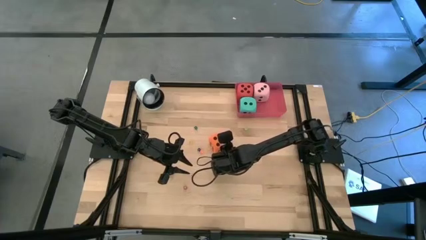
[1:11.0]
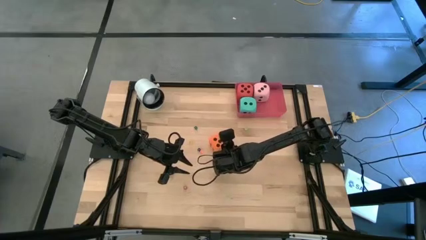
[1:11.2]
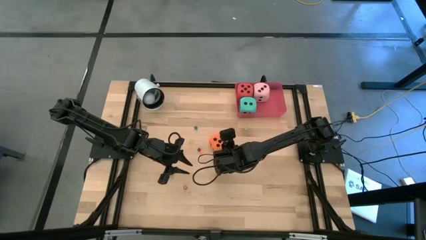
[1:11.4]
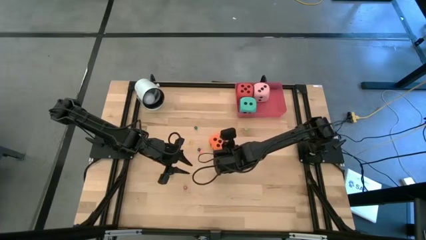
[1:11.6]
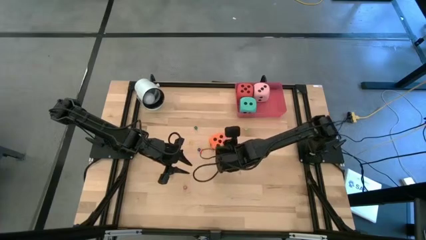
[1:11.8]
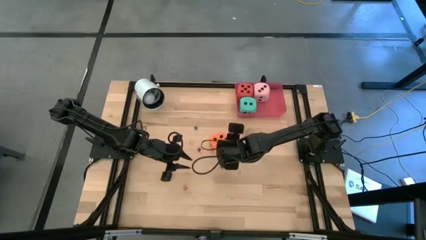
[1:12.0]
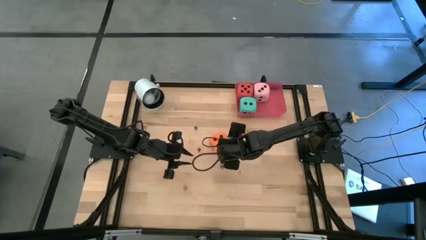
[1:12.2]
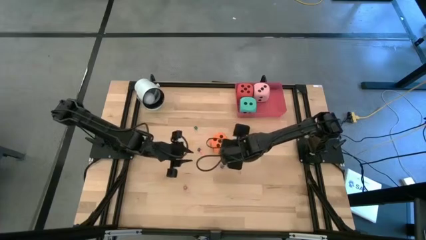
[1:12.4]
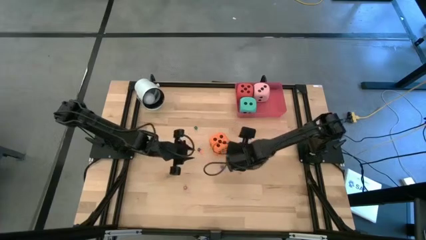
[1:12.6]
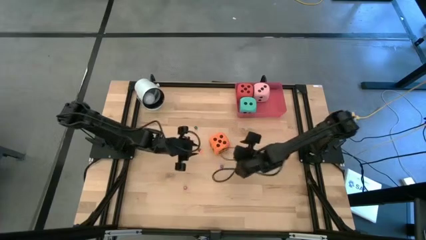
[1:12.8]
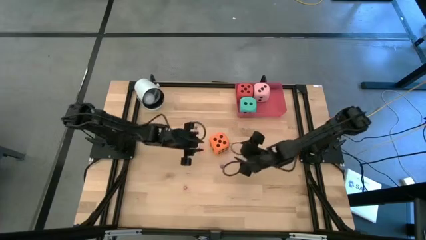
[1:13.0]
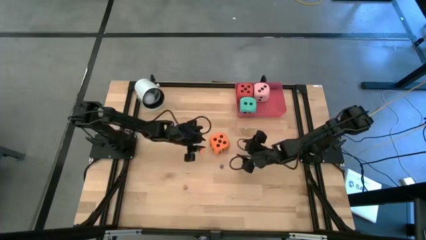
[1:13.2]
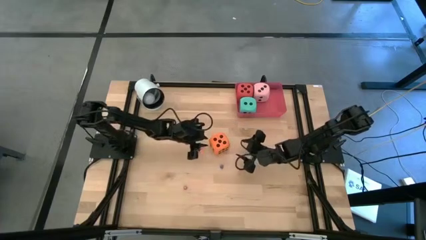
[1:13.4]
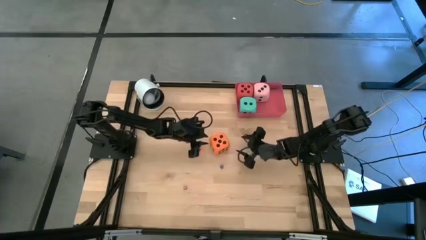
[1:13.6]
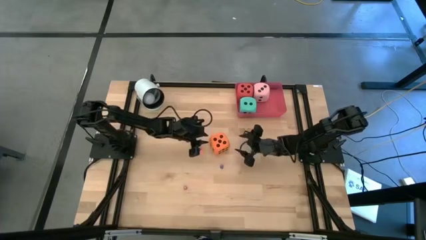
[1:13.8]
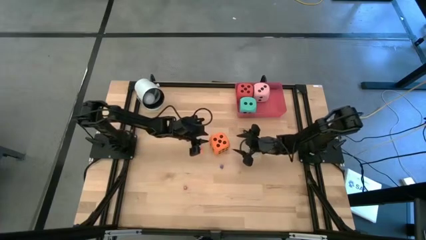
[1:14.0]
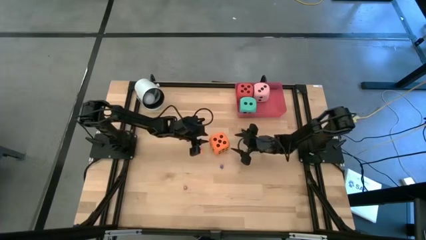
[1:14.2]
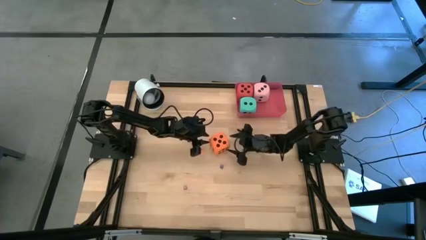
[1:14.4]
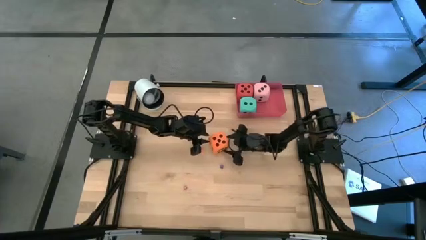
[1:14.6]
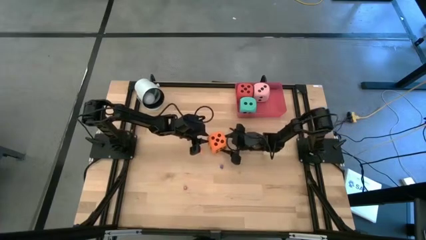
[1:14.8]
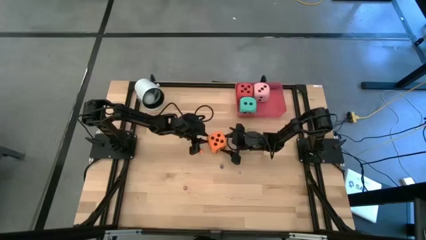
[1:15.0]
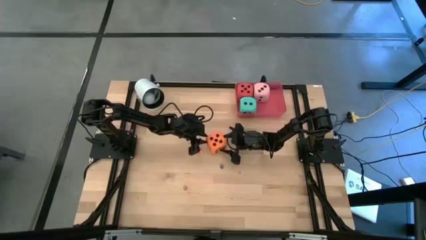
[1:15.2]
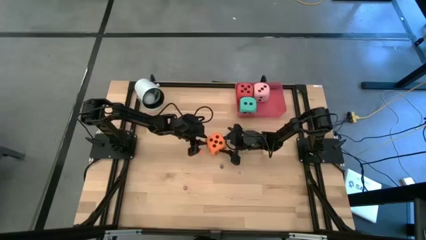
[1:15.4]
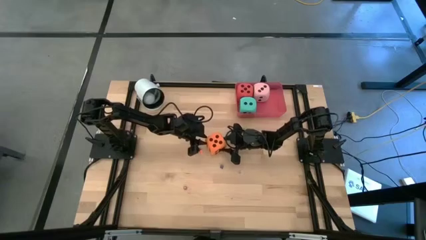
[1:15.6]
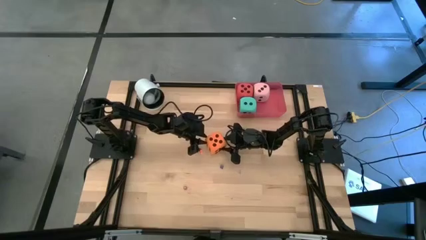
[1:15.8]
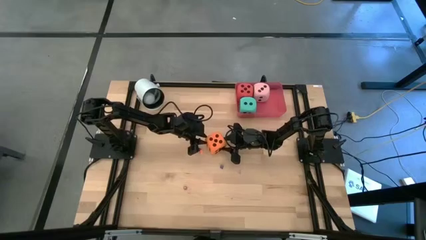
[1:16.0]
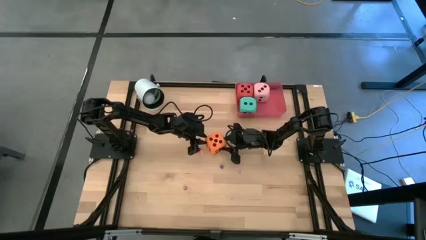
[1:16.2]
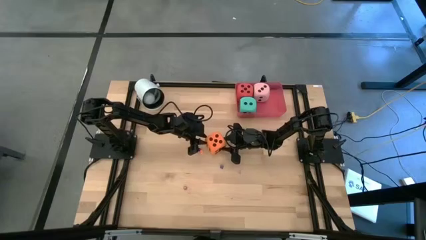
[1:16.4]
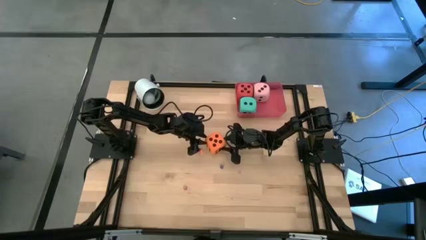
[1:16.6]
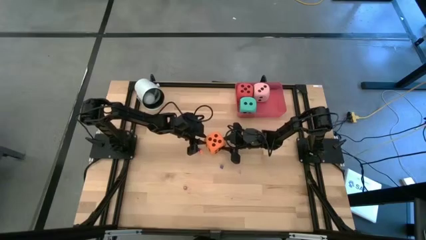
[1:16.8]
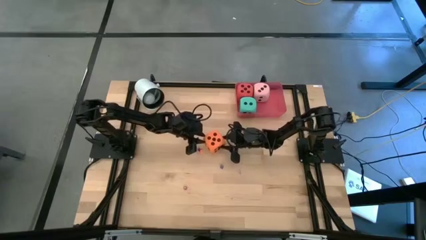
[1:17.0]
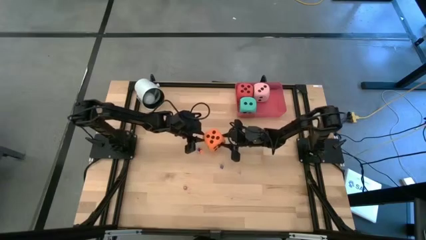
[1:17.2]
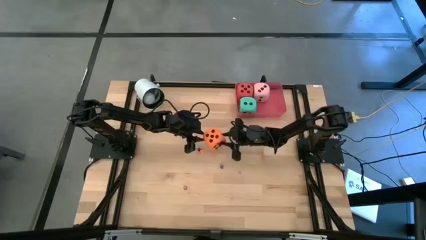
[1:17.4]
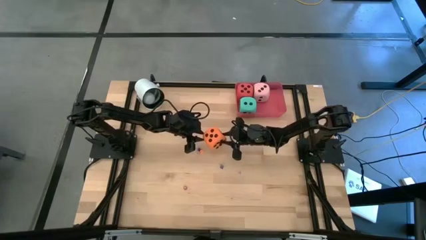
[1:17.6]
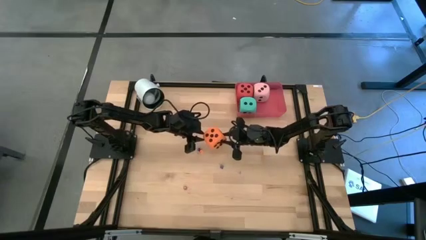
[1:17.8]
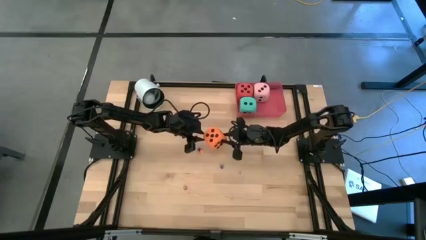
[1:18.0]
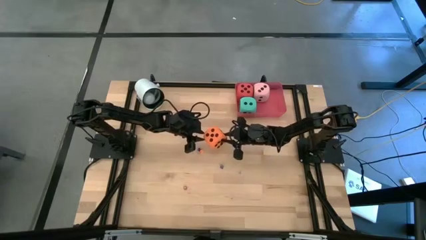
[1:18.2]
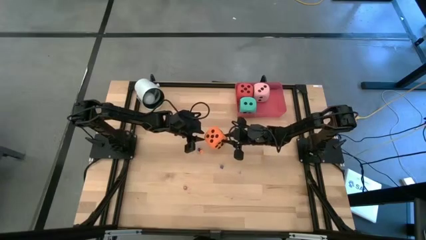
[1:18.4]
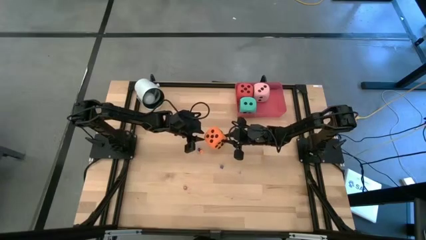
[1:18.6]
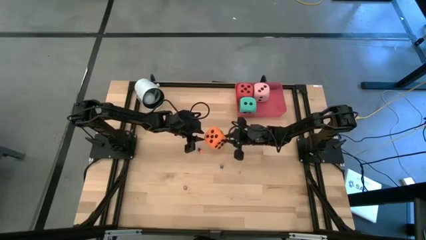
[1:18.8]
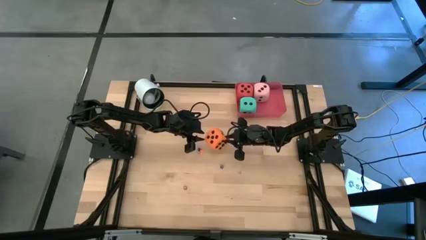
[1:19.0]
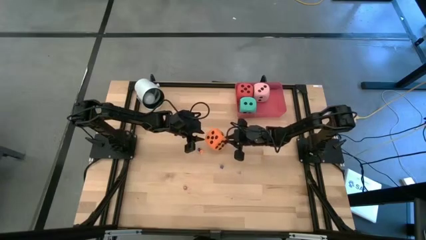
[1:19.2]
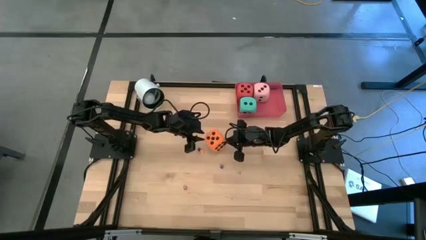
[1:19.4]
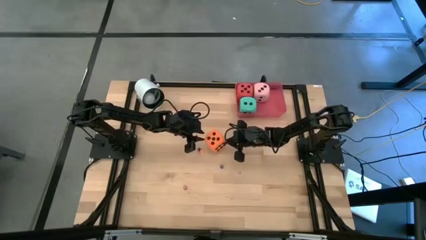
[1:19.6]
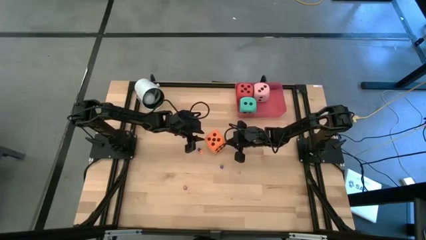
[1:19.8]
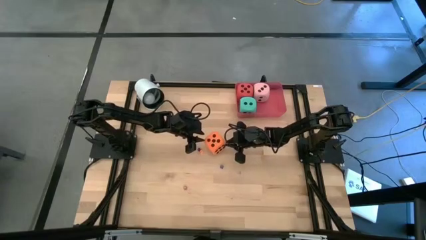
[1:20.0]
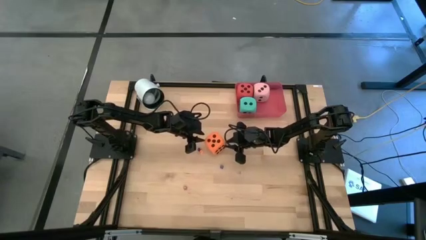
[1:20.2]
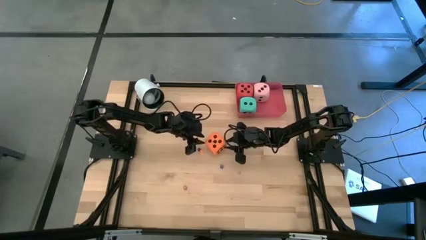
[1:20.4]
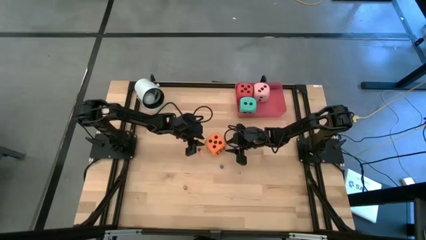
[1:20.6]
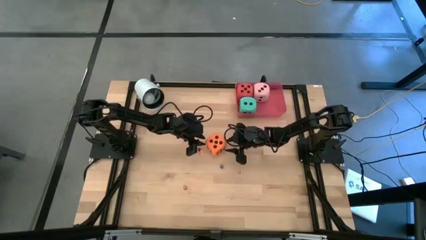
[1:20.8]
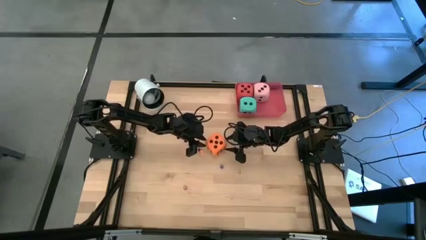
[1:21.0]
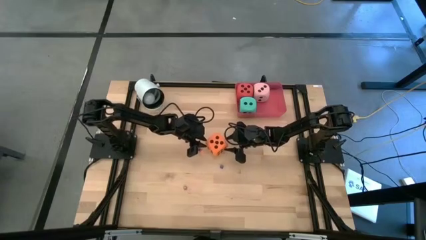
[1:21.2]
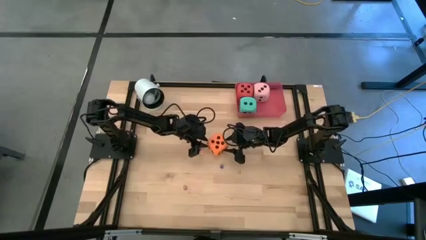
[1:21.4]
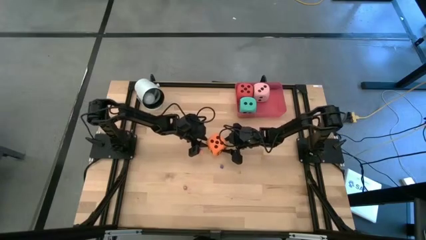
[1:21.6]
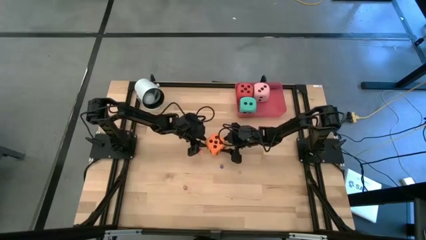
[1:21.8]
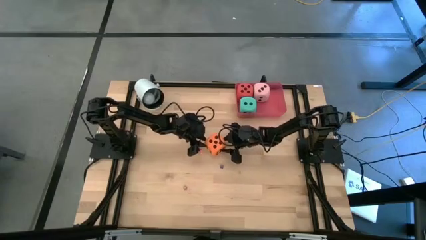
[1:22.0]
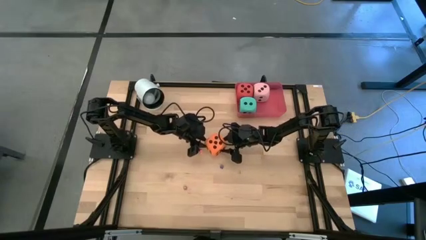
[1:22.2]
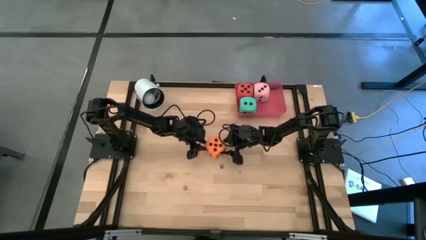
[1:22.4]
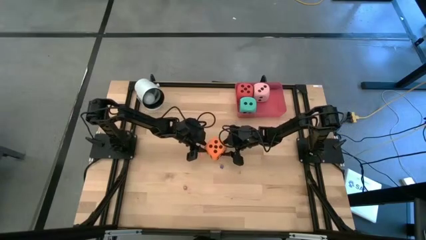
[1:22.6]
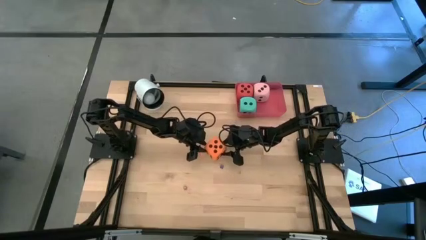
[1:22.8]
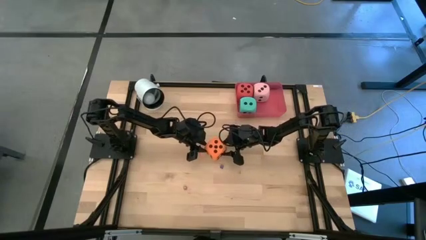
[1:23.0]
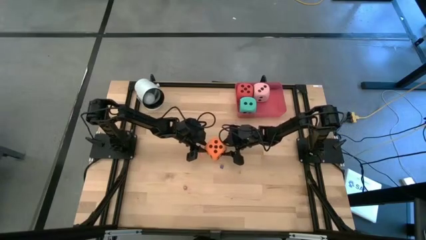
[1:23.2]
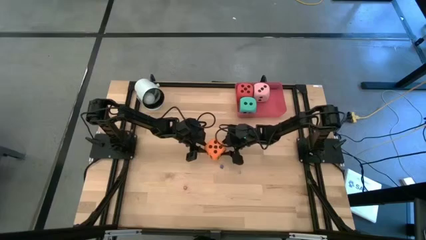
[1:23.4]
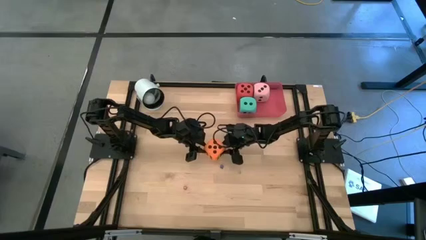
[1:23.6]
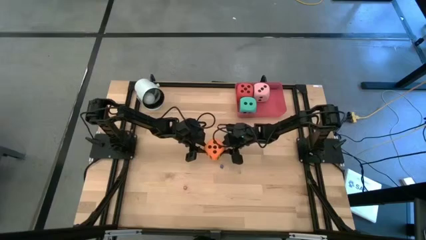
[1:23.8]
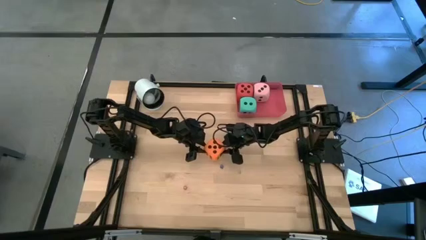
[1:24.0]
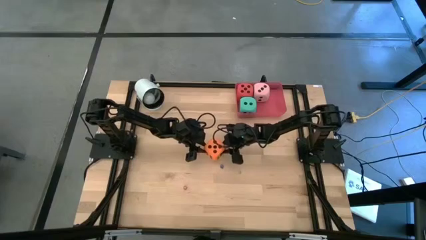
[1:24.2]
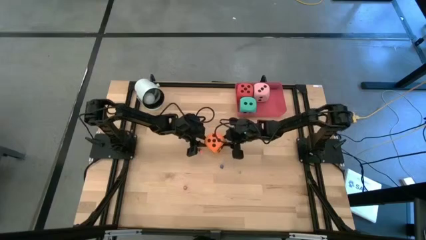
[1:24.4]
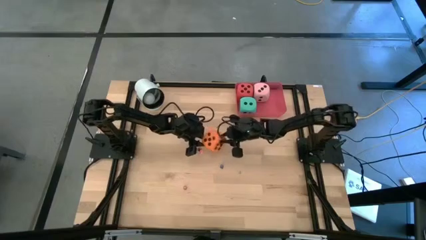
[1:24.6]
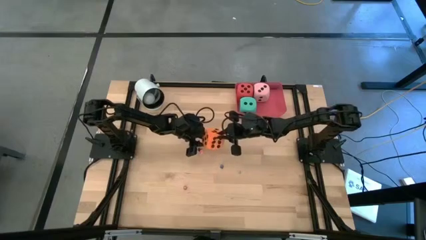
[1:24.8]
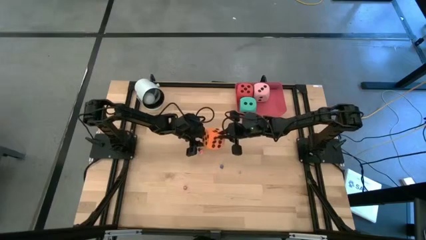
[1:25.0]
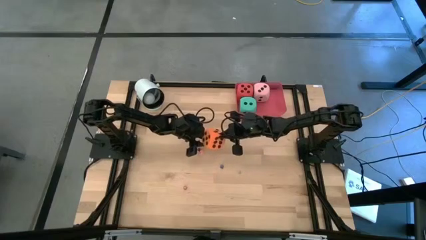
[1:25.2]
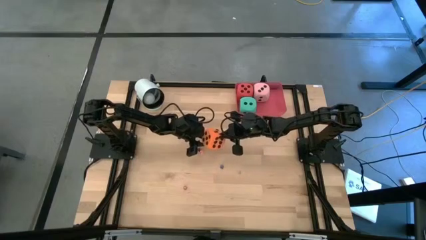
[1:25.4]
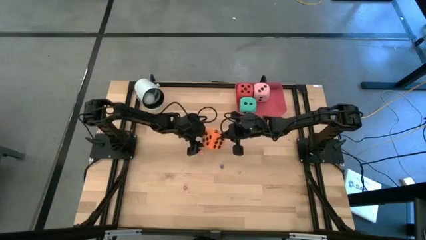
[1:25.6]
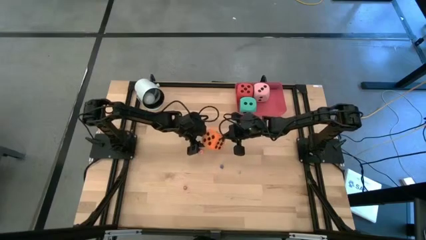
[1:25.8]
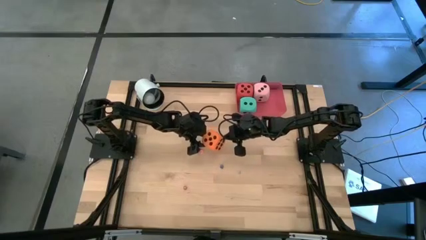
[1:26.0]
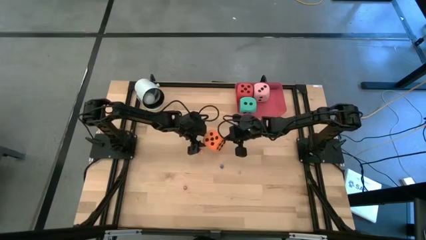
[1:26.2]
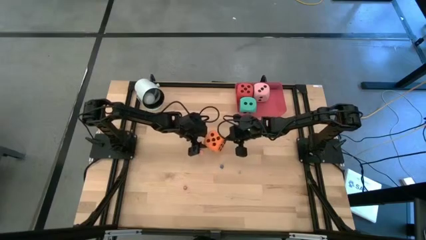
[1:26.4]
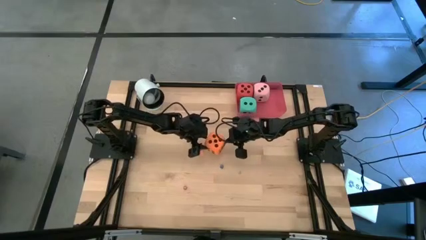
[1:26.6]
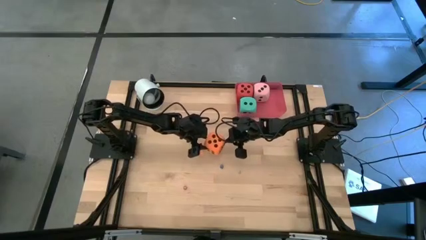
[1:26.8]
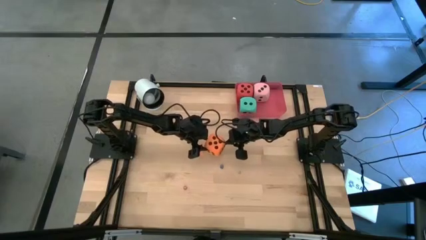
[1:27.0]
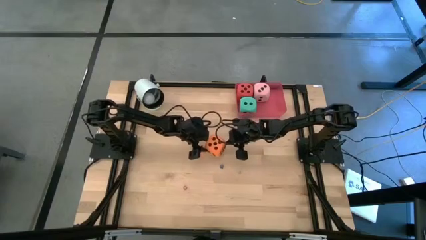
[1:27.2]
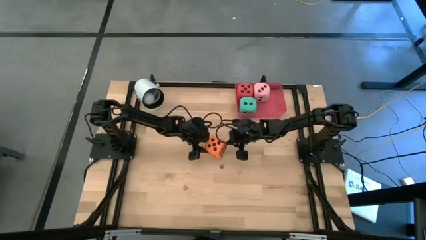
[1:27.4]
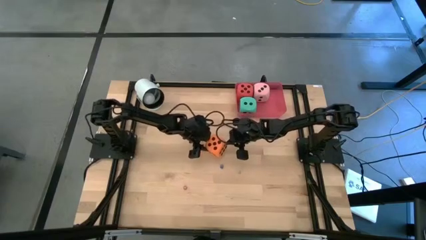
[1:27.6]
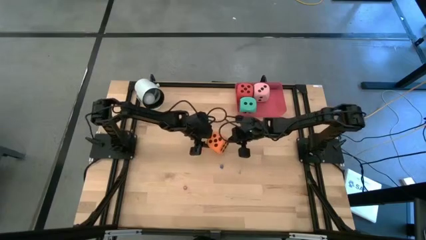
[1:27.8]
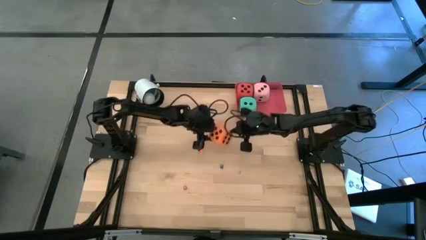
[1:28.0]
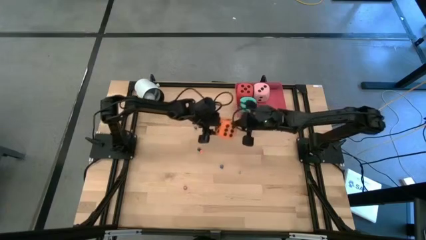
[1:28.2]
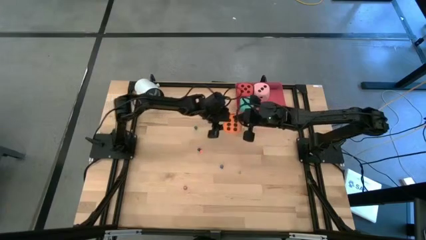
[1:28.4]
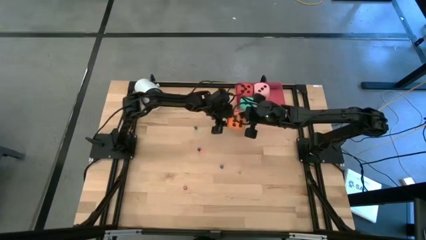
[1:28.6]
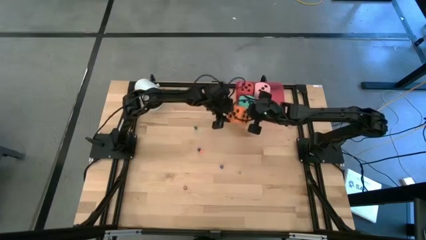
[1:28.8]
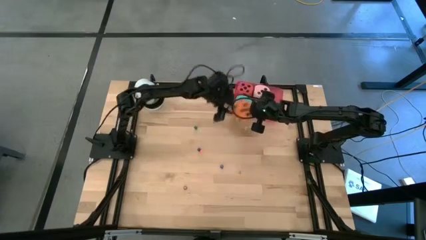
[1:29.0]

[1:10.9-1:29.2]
Task: Pick & Place Dice
Put the large orange dice into the red bin
